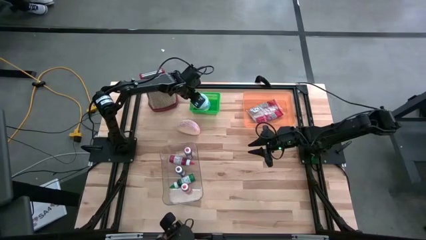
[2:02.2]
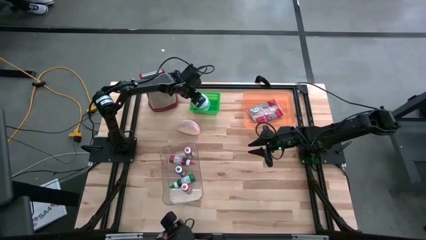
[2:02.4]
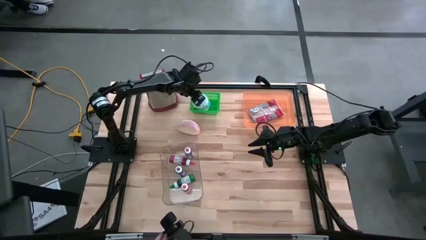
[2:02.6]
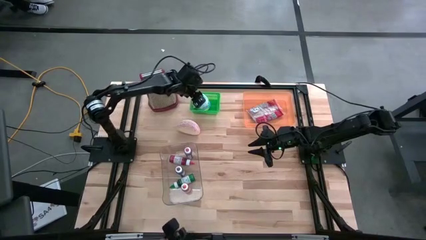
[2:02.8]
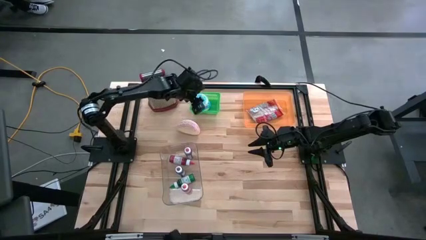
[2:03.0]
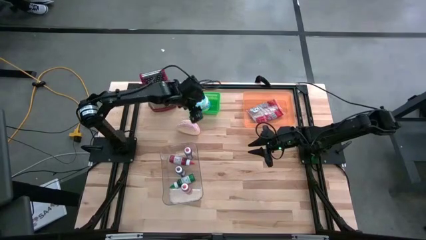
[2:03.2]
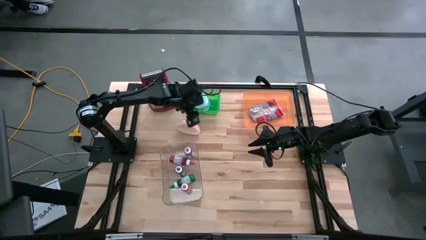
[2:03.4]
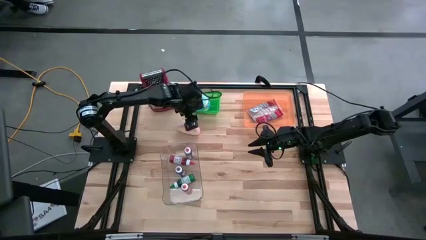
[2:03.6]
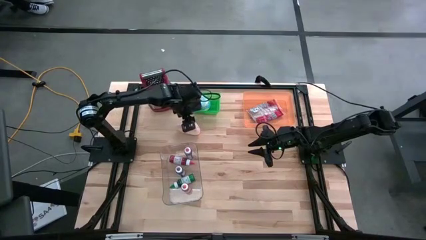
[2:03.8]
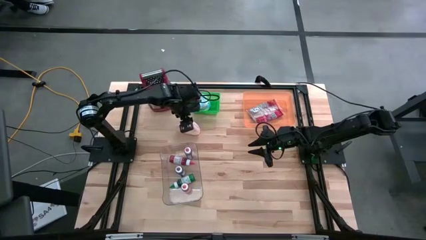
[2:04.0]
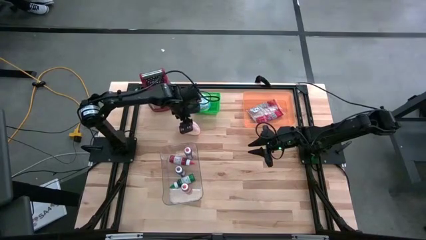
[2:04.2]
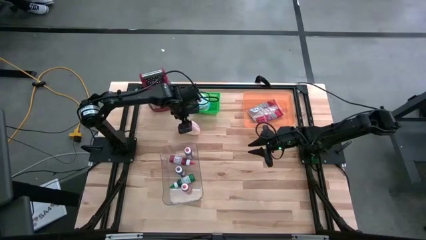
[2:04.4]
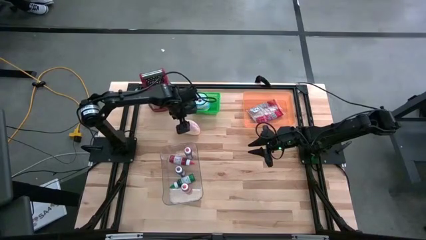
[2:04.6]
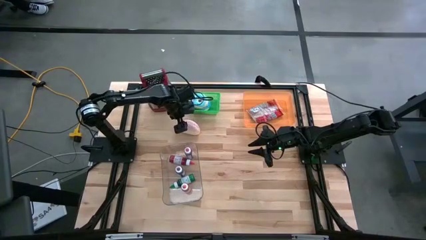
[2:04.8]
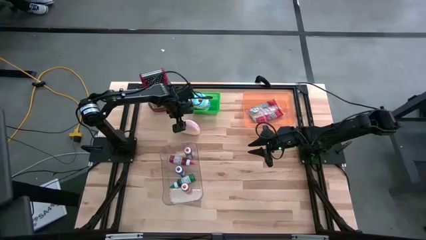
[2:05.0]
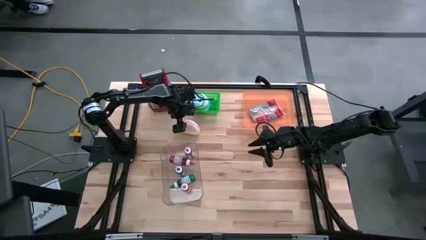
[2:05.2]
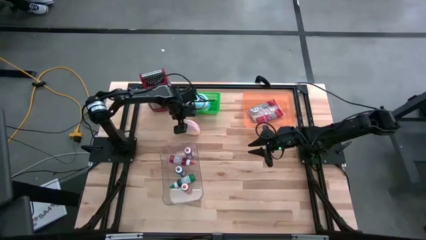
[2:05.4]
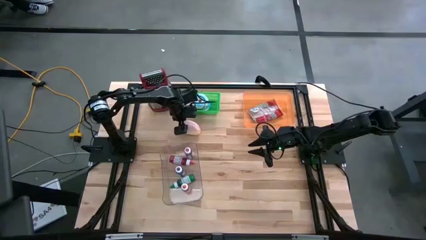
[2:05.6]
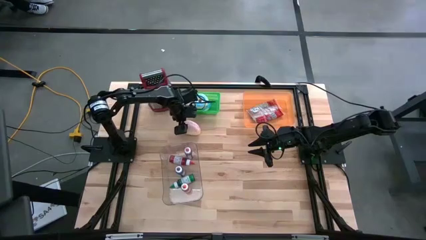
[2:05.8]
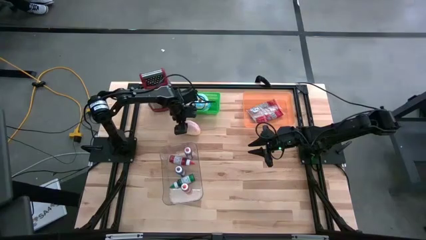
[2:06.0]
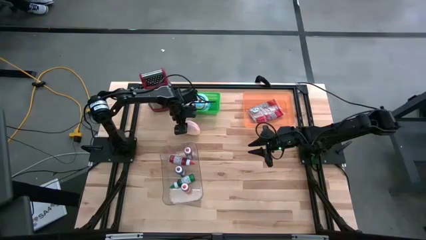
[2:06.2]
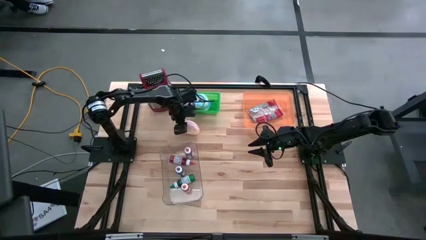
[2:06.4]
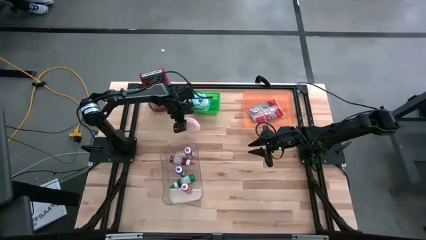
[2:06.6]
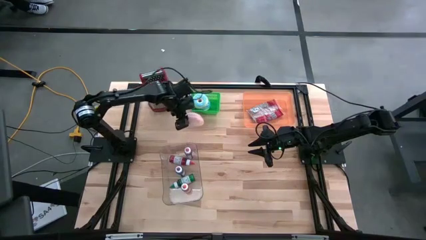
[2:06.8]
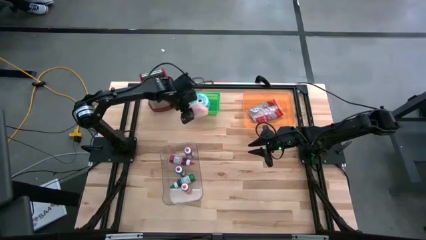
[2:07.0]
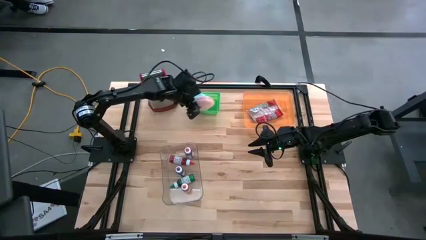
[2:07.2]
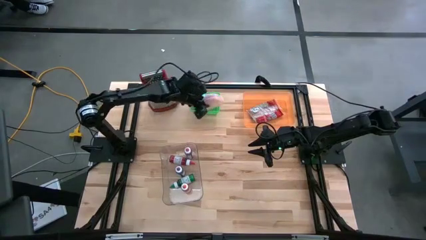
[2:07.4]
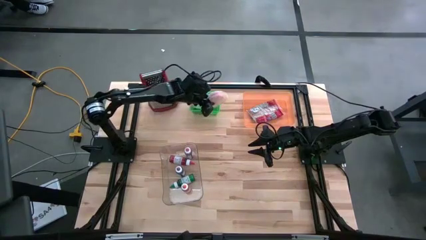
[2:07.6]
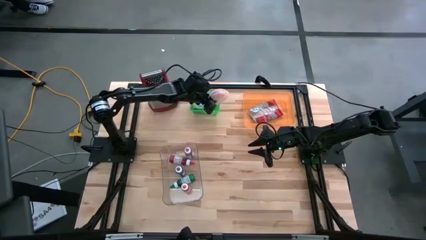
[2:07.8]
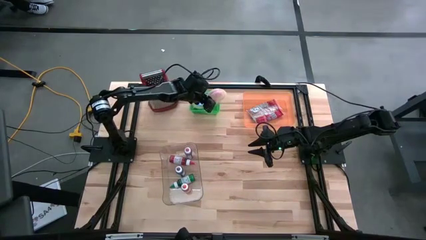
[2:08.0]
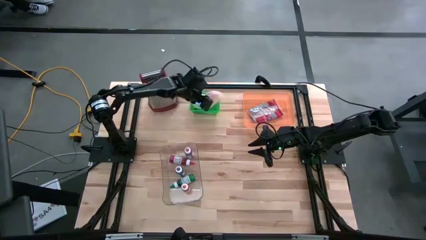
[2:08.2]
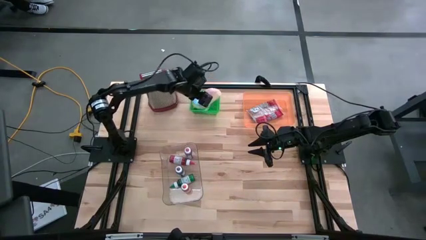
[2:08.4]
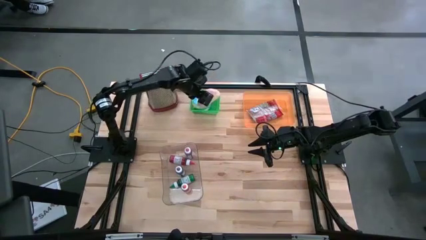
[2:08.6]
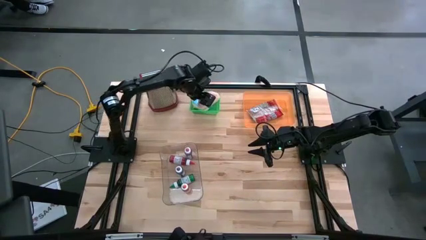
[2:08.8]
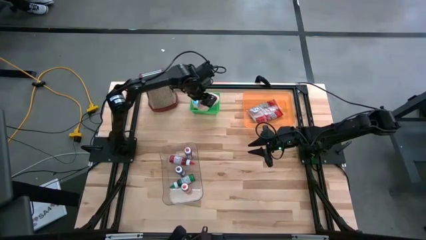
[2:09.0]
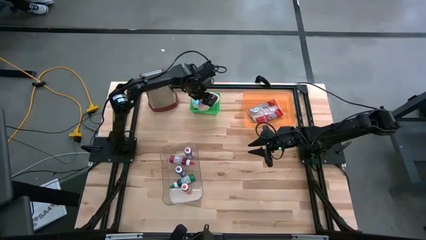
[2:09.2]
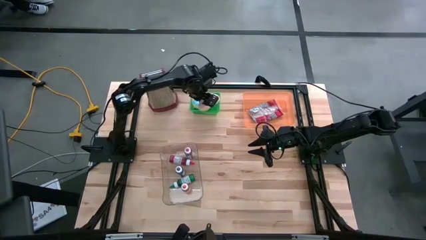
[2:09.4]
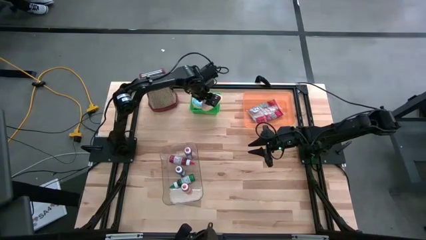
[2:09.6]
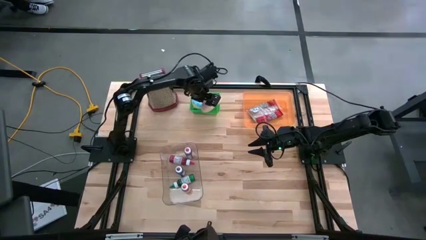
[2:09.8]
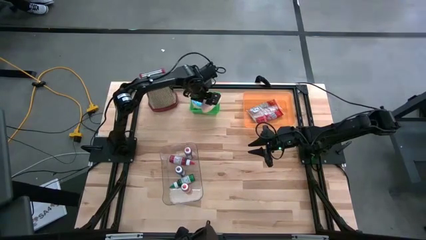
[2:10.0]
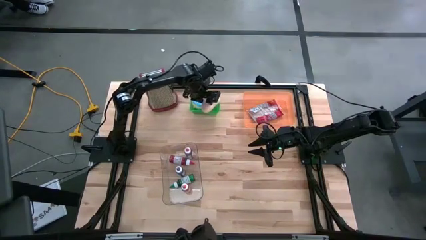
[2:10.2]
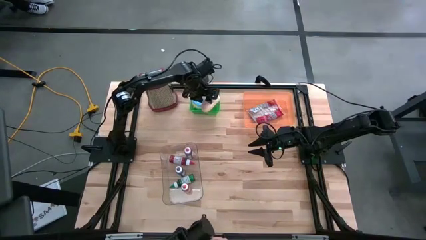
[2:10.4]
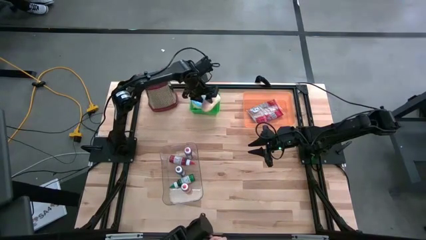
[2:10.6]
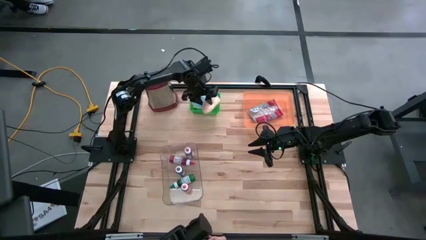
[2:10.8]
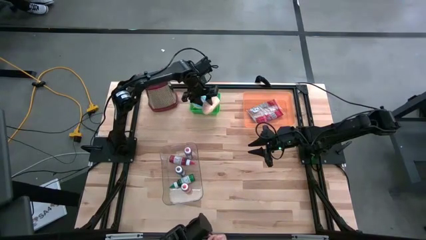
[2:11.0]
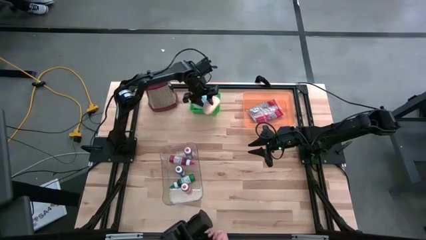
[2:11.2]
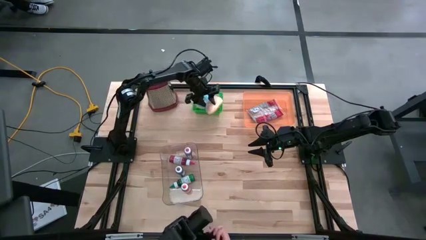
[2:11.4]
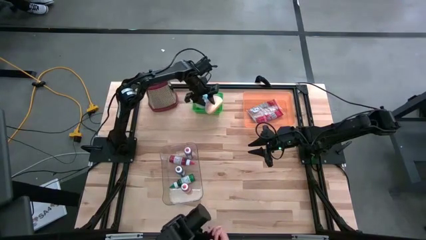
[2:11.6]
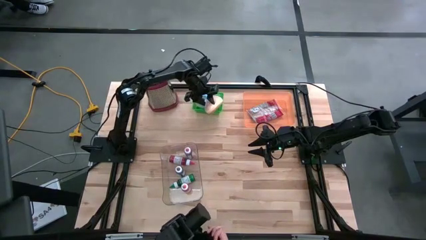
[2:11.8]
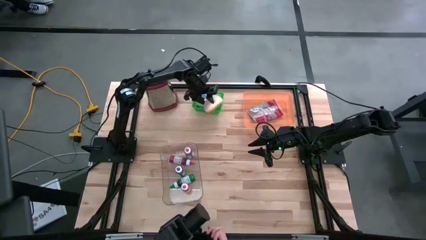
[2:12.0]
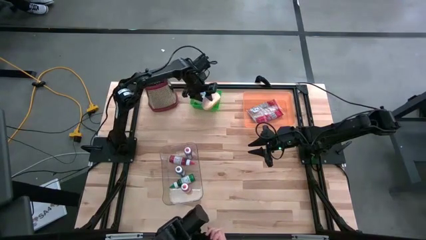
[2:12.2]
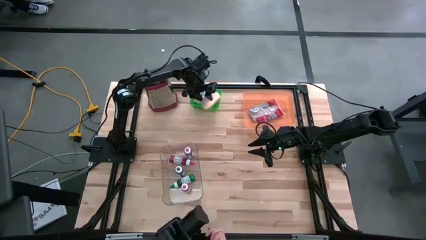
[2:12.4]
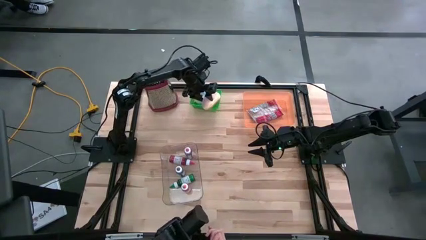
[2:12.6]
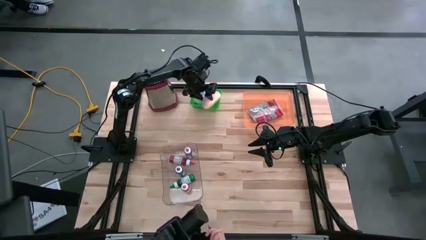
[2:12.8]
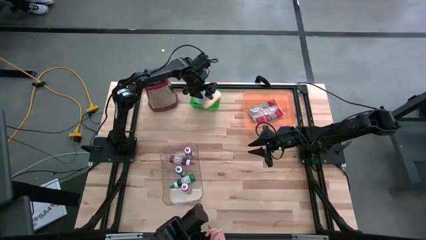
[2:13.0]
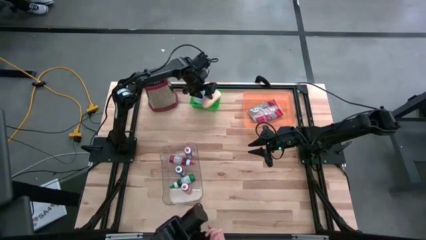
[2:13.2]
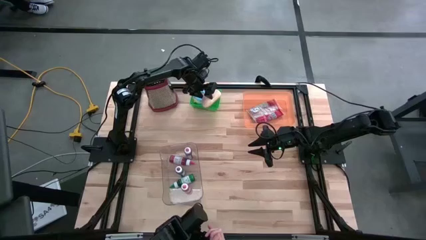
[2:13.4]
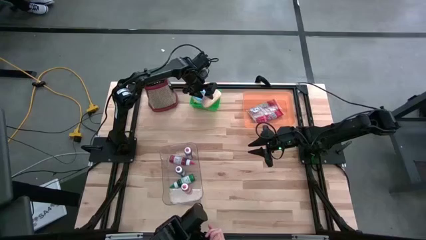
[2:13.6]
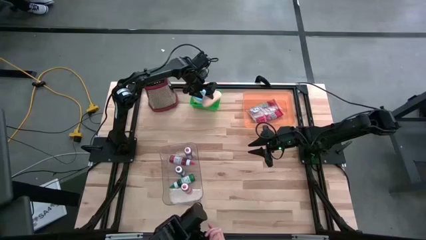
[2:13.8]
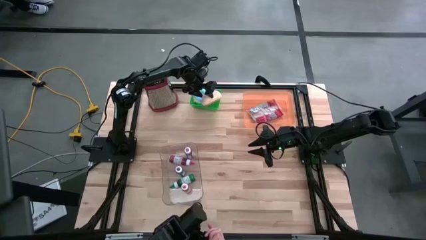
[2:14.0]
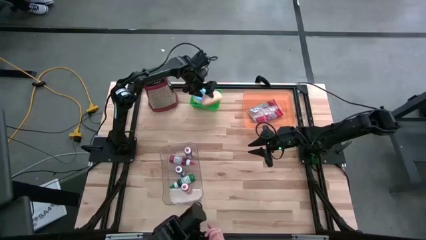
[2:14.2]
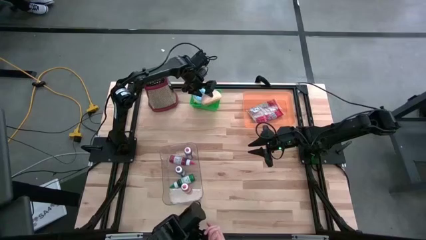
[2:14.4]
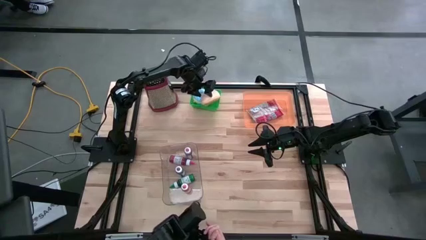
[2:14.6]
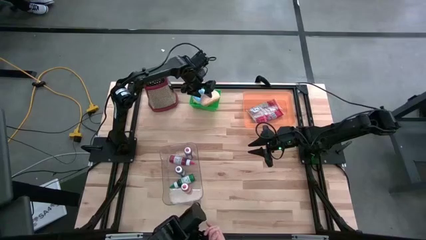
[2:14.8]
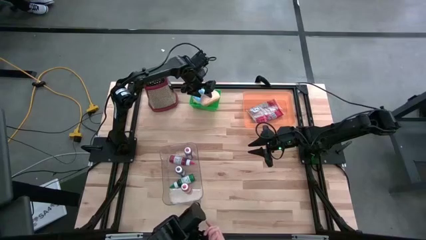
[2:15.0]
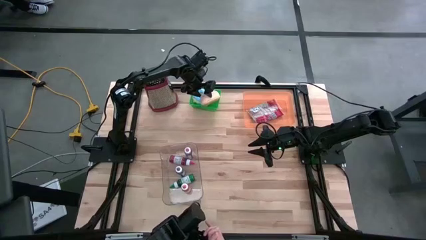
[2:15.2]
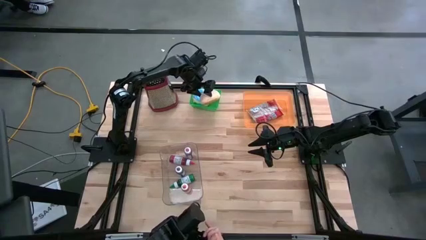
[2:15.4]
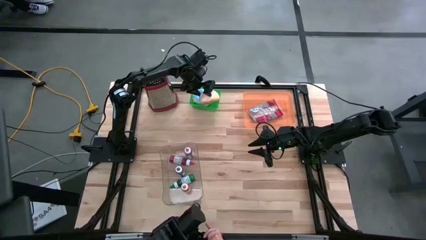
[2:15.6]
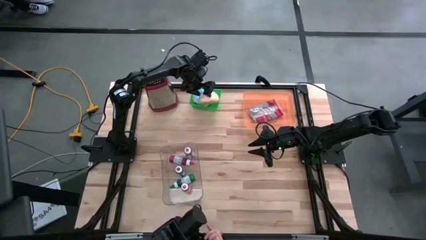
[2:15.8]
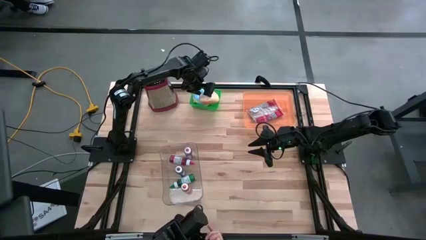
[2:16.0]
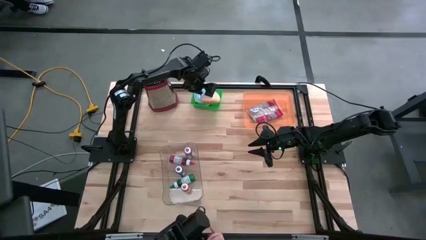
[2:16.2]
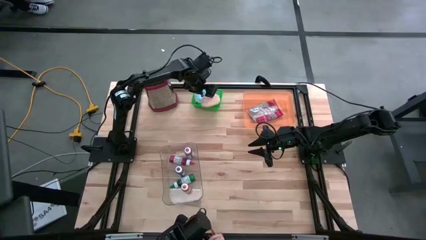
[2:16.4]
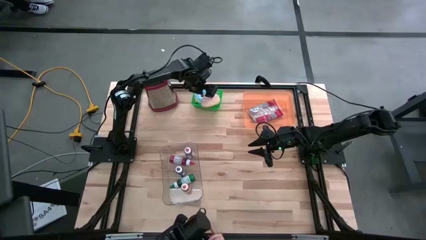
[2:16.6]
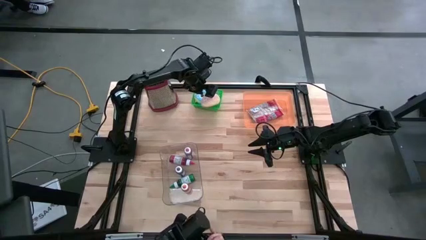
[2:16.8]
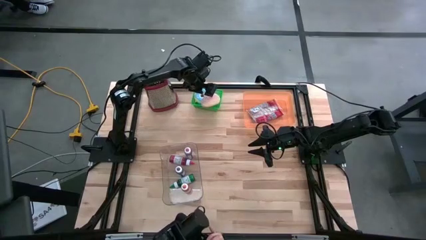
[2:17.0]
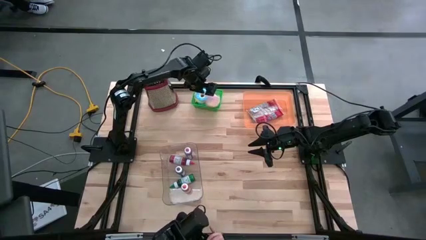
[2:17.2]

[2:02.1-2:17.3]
Put the white donut into the green basket
